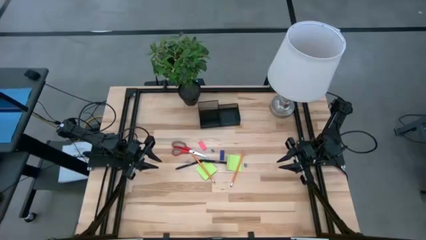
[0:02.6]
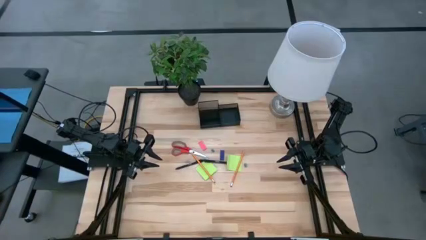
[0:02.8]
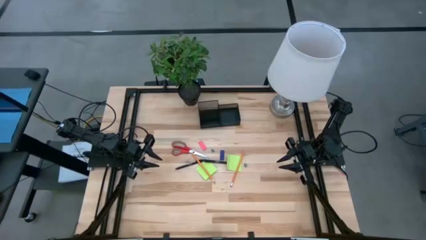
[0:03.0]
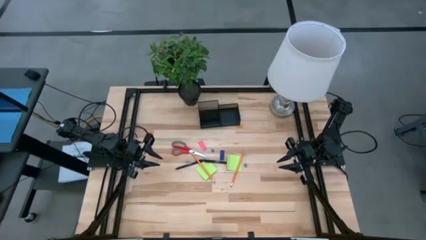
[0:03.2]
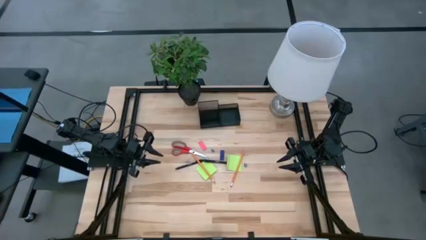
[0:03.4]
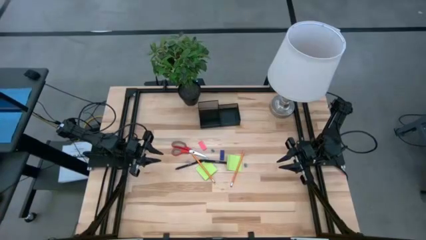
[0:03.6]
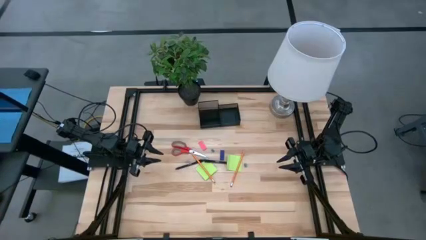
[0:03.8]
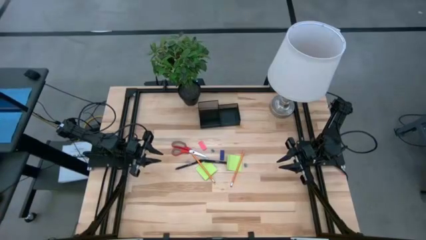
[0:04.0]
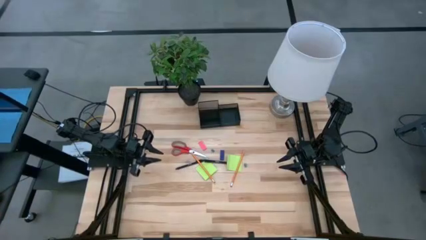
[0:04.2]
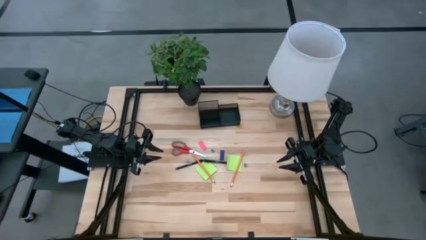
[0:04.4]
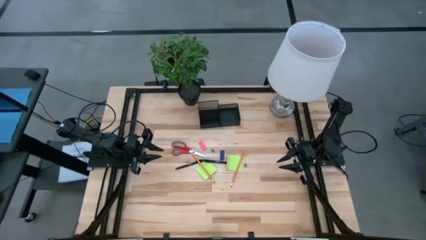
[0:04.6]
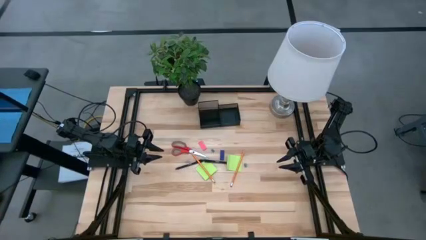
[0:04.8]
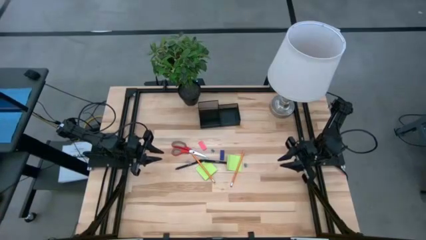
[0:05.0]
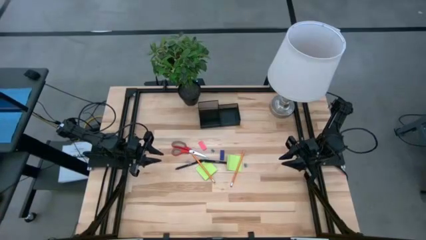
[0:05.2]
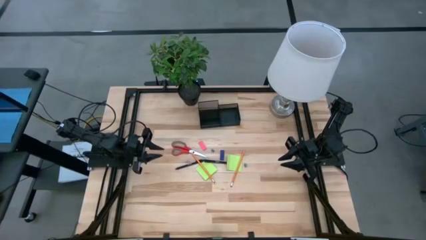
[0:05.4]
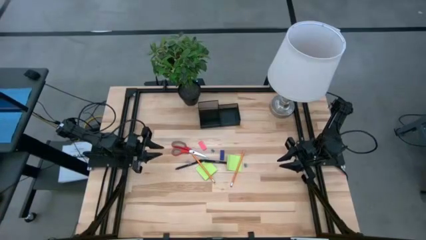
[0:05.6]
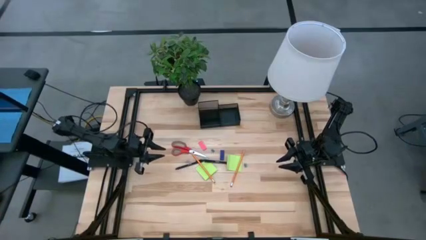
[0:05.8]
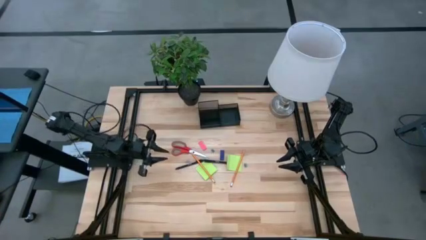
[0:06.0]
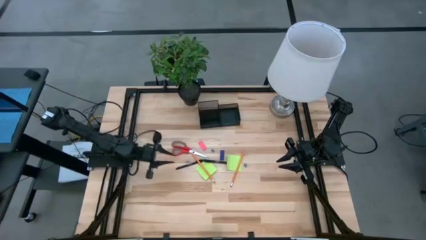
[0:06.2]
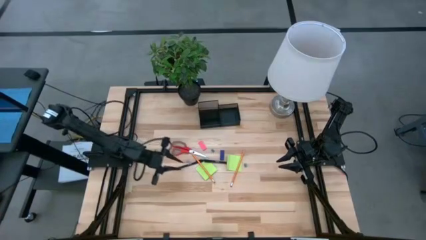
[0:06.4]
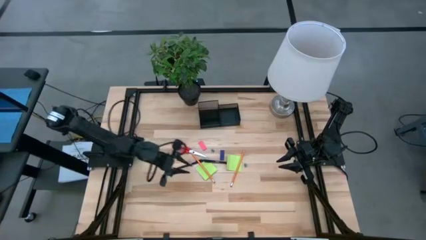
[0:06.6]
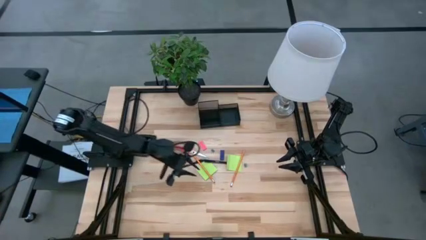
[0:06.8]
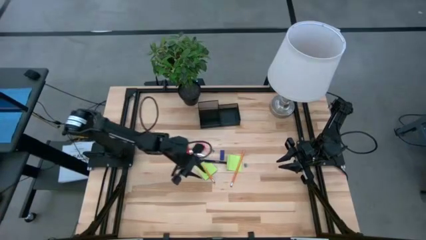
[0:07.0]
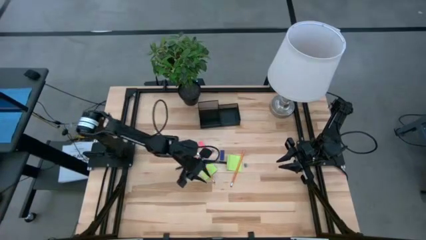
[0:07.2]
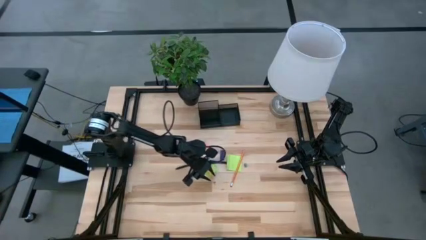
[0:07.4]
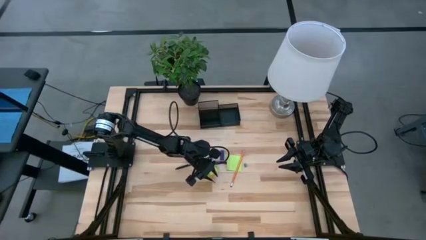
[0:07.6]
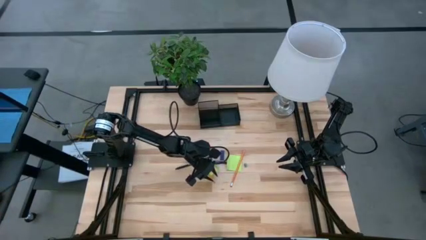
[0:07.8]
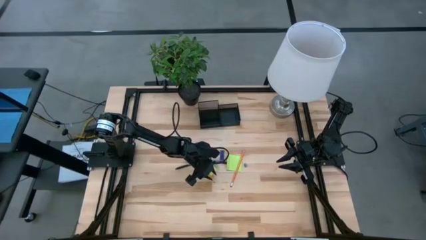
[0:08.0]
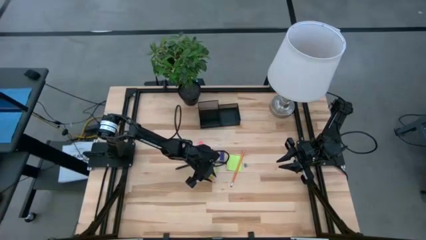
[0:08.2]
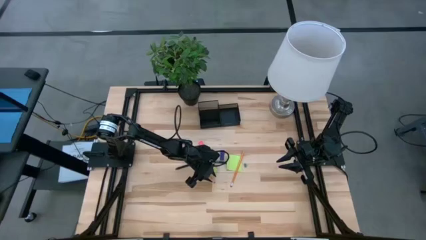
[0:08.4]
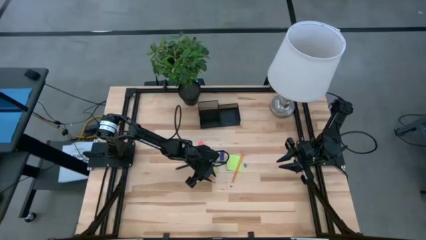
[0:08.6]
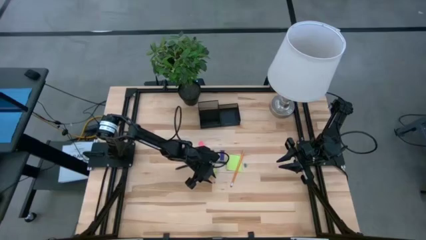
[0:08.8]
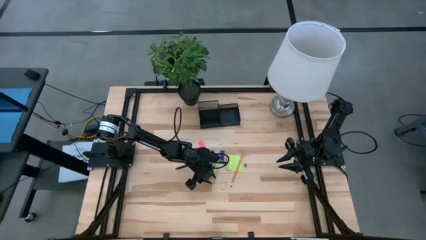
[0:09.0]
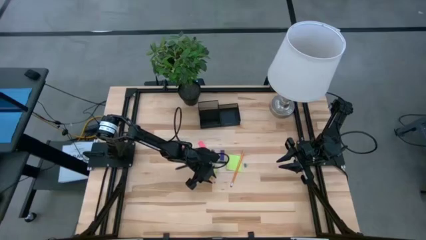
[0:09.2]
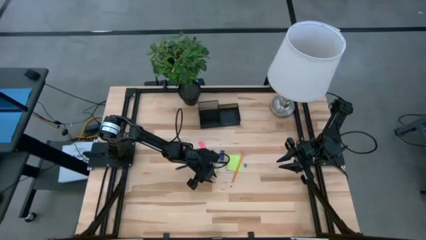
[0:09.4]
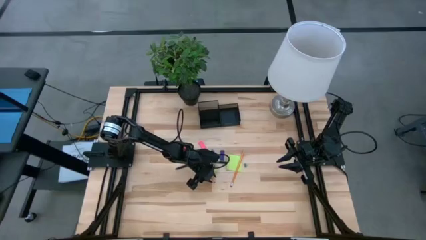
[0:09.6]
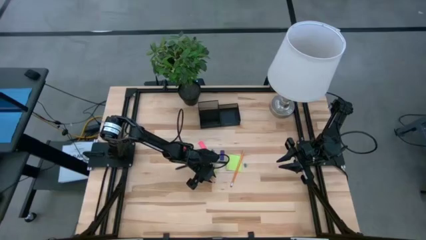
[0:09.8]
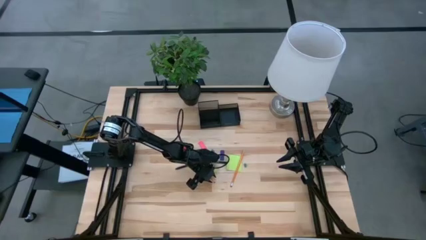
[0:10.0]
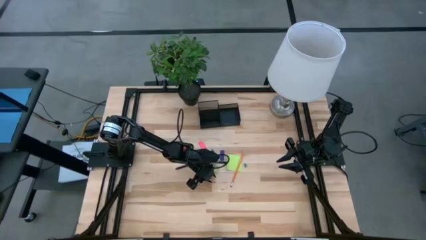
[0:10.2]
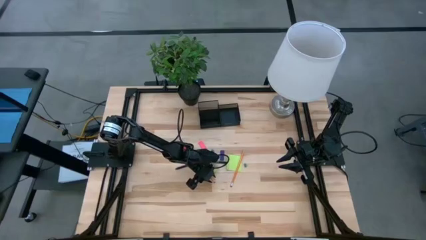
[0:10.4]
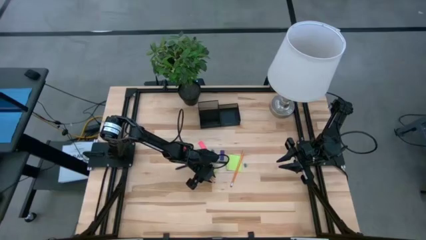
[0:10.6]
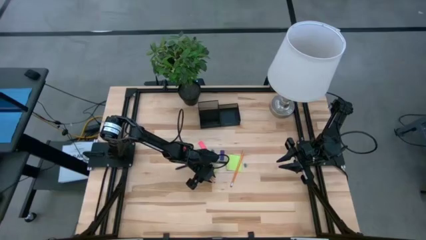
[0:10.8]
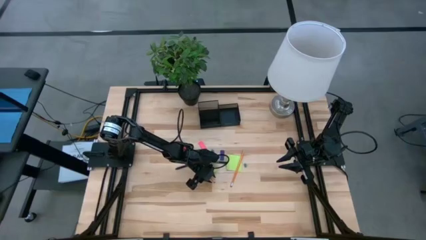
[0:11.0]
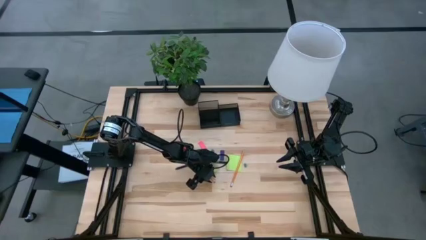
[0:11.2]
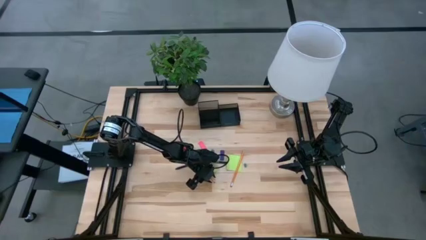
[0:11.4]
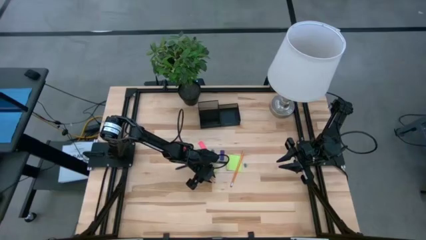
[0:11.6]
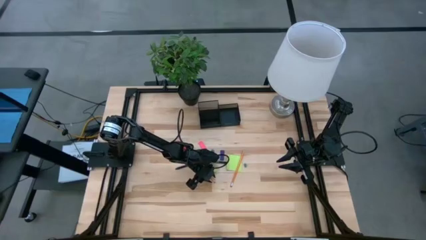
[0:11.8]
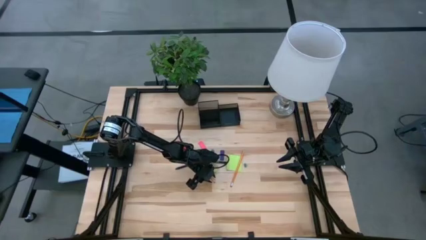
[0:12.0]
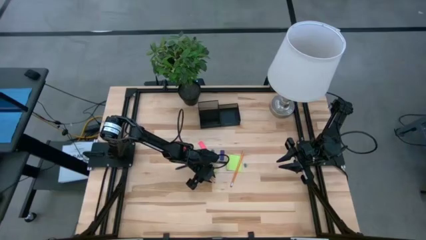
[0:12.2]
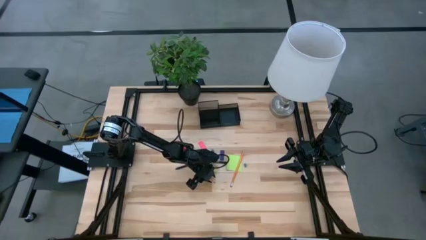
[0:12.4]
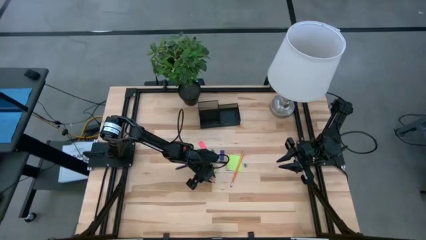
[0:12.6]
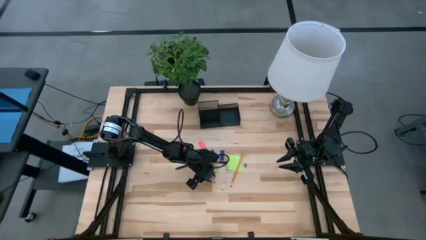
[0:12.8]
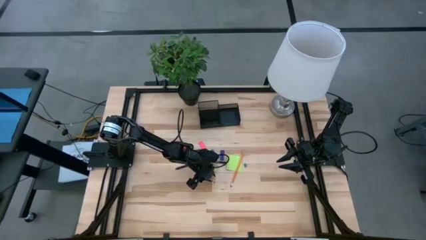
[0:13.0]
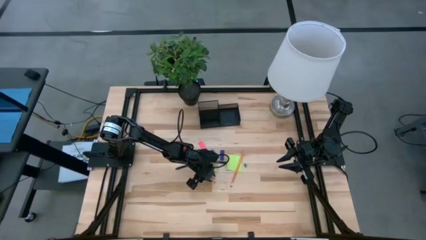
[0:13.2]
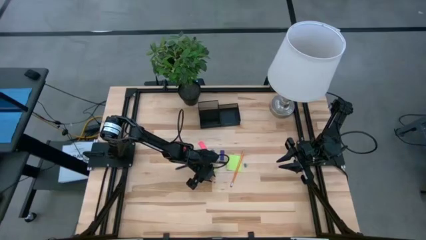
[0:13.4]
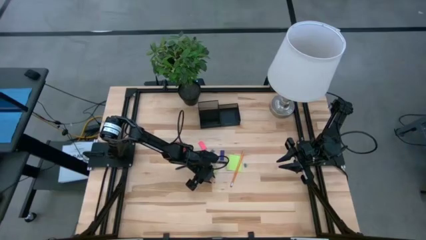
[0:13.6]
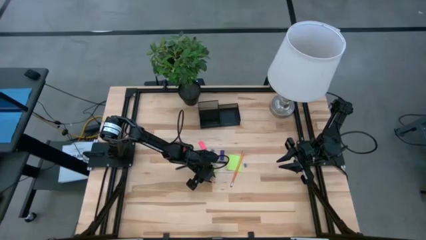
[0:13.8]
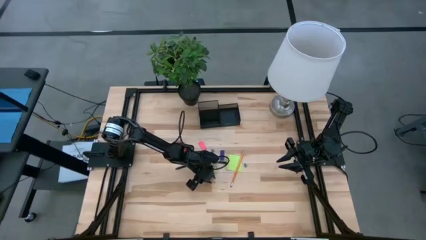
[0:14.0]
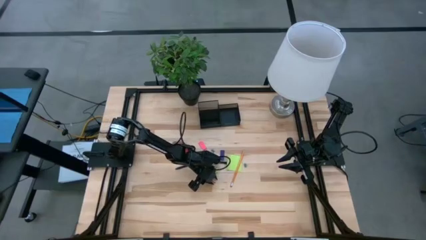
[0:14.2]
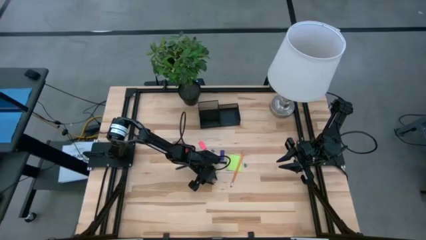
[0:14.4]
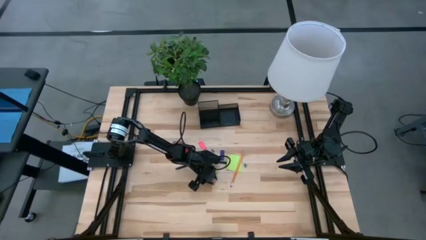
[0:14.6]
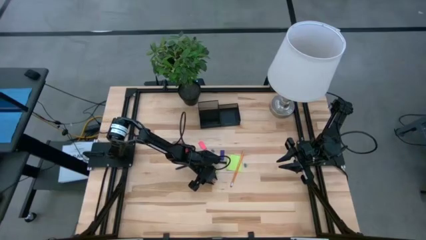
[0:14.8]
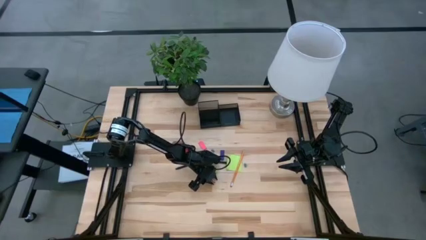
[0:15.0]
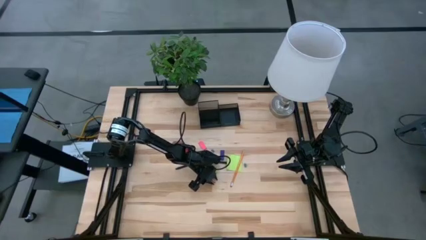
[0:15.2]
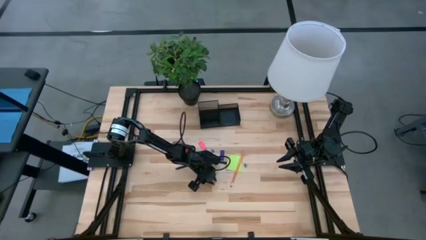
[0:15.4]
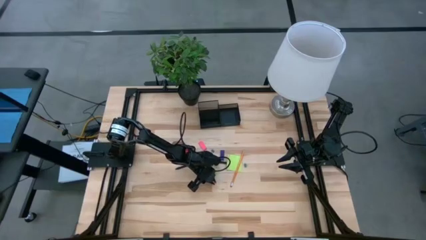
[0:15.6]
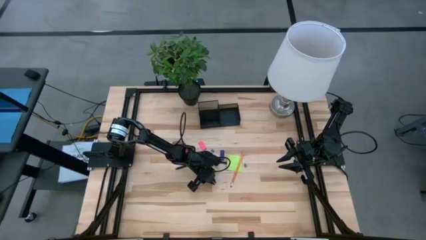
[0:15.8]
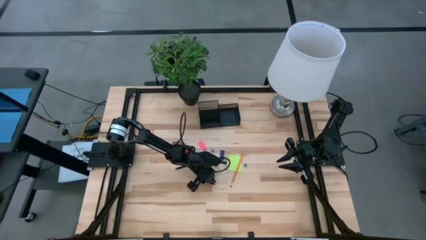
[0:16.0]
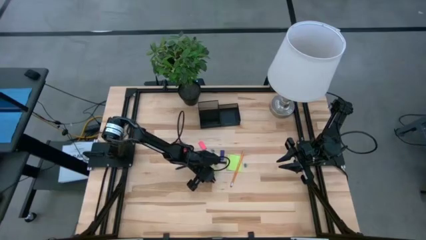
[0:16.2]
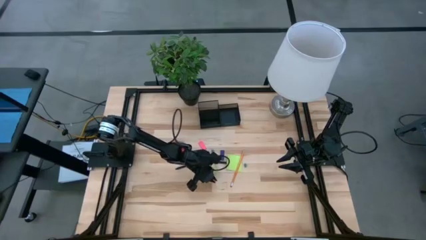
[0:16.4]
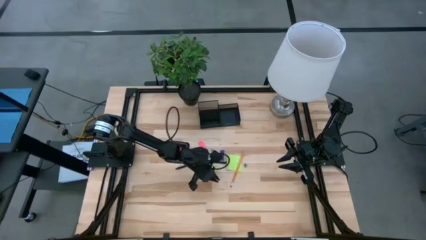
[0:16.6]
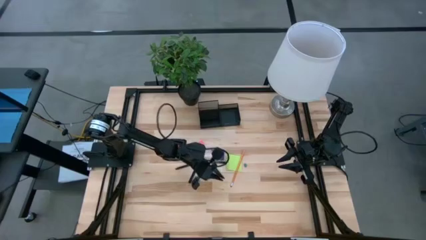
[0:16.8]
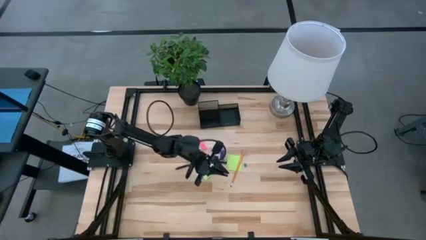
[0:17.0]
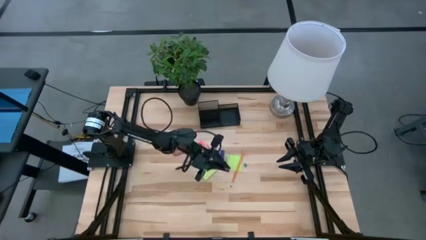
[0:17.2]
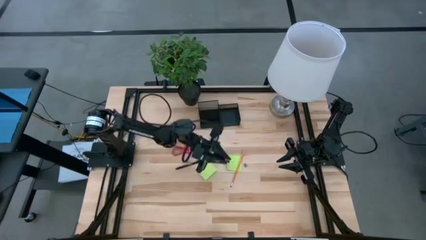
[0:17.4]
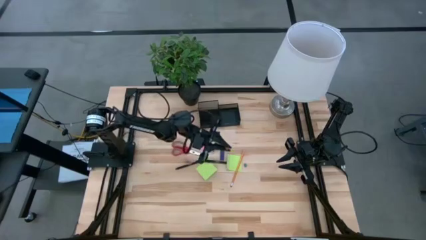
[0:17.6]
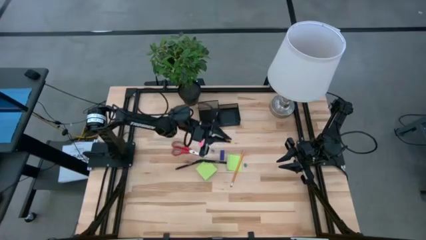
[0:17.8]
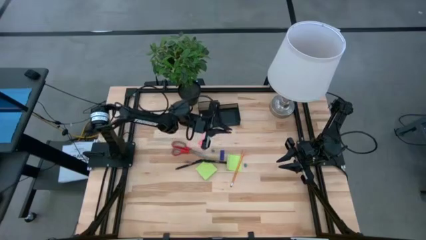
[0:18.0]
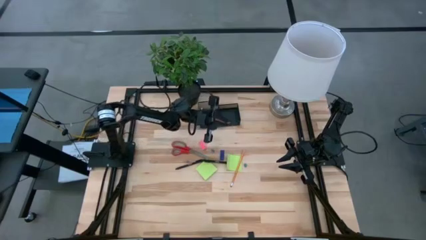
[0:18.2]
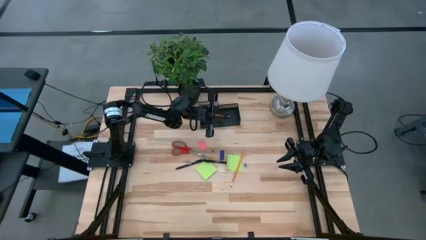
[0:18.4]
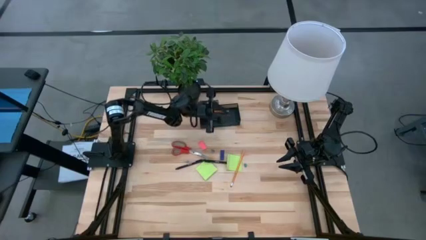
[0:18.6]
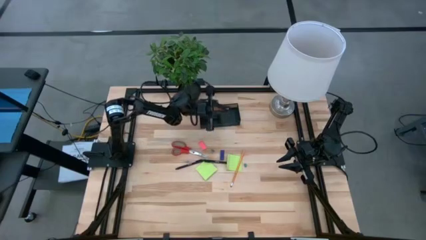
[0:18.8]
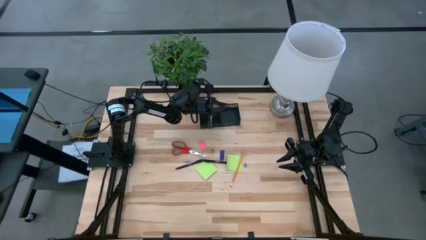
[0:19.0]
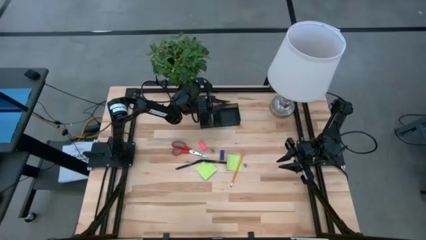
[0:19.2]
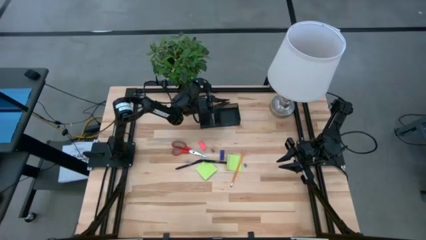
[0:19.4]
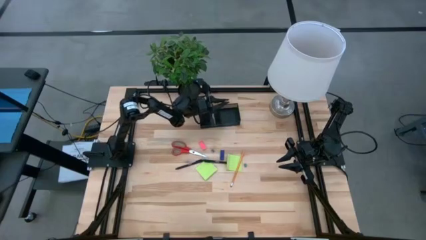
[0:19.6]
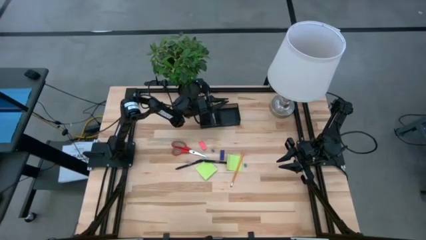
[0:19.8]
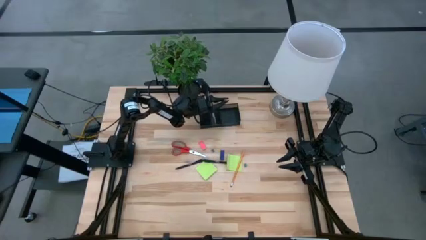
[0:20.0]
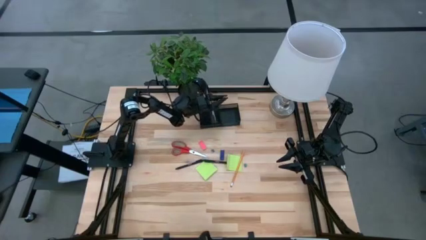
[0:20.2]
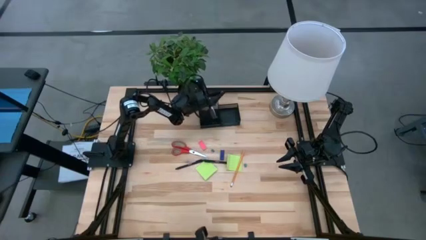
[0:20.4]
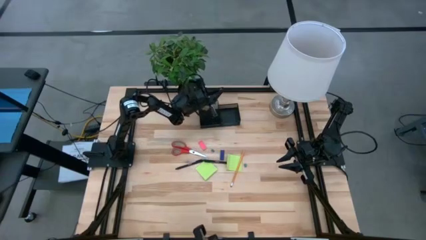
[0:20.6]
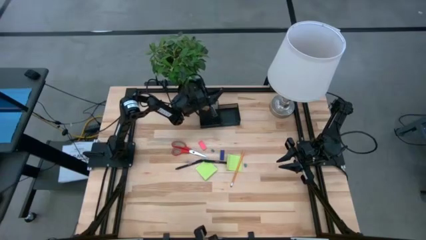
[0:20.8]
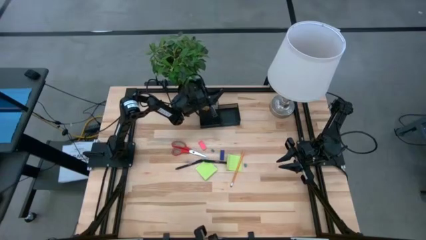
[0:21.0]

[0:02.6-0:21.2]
Task: Pick and place office supplies into organizer
Put the left orange pencil into the desk organizer
